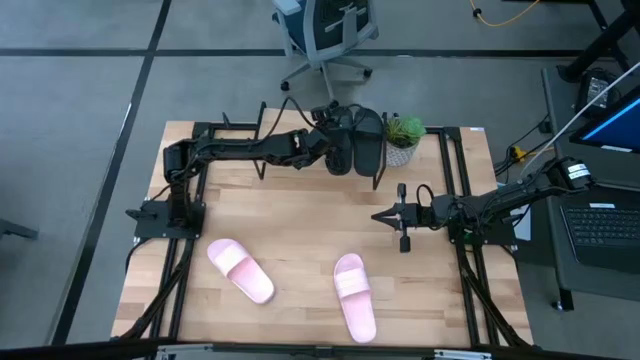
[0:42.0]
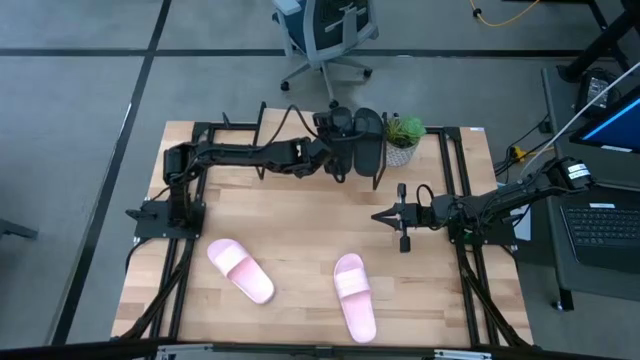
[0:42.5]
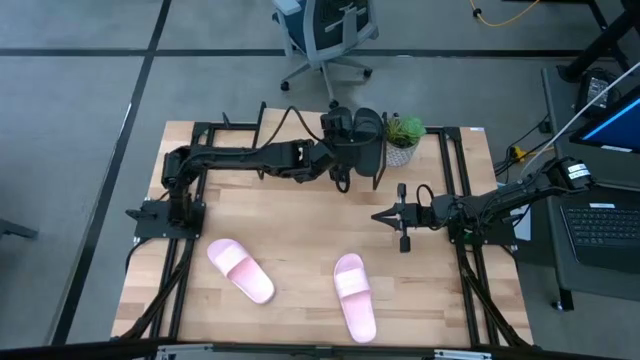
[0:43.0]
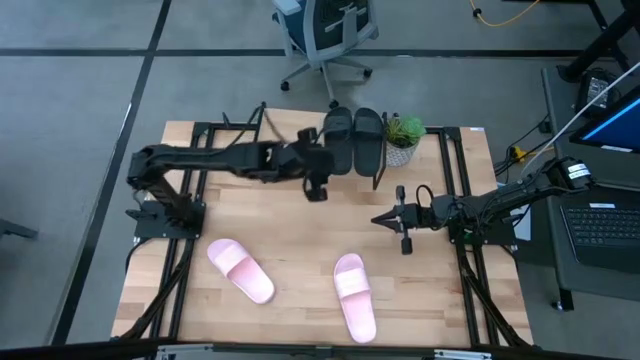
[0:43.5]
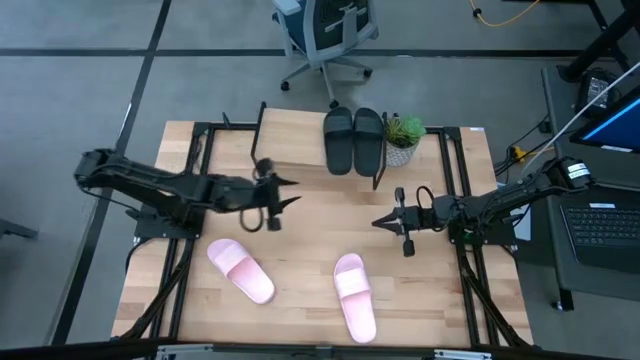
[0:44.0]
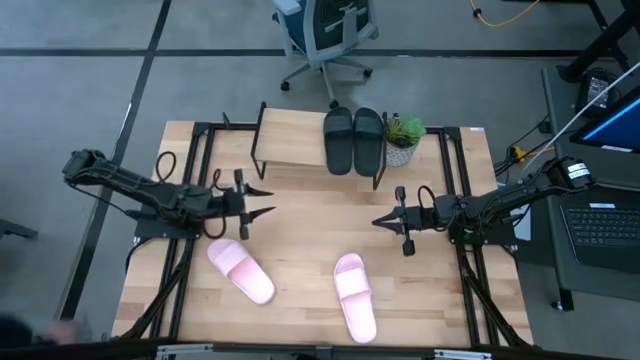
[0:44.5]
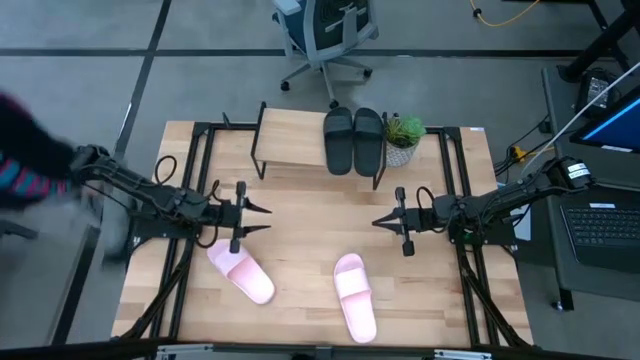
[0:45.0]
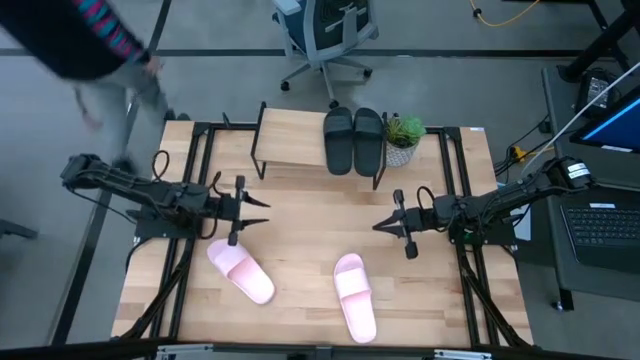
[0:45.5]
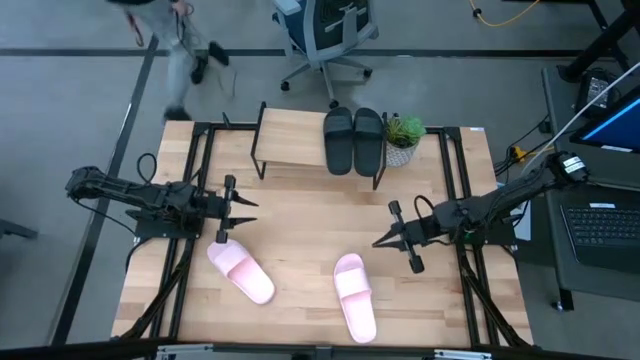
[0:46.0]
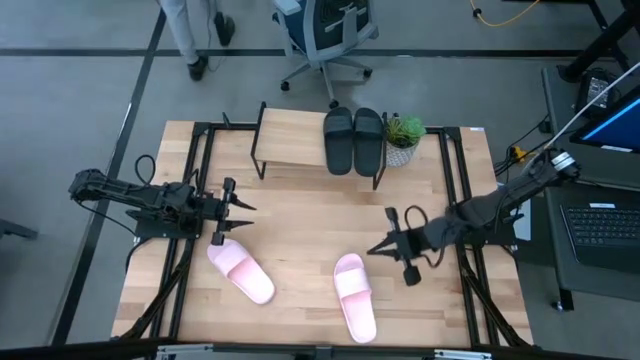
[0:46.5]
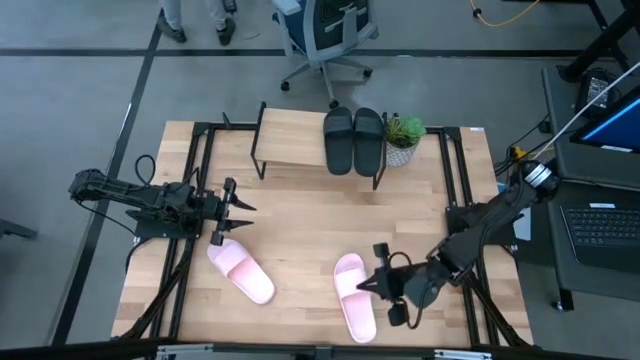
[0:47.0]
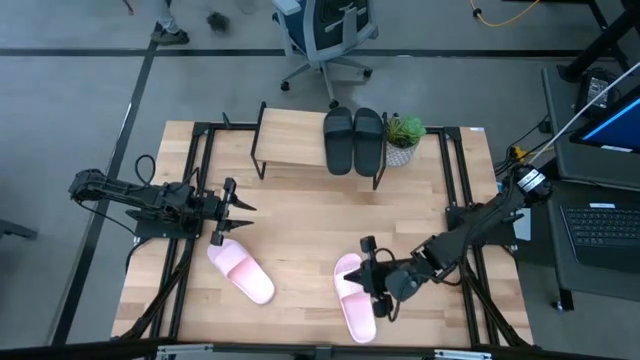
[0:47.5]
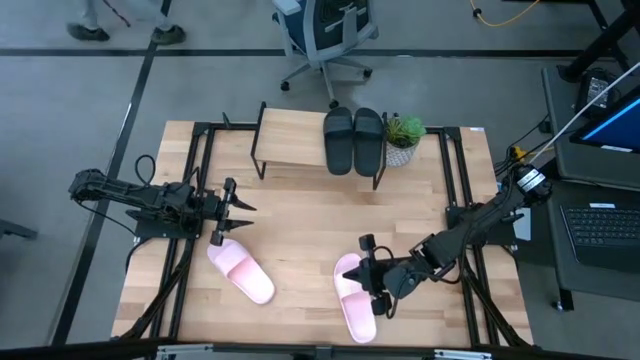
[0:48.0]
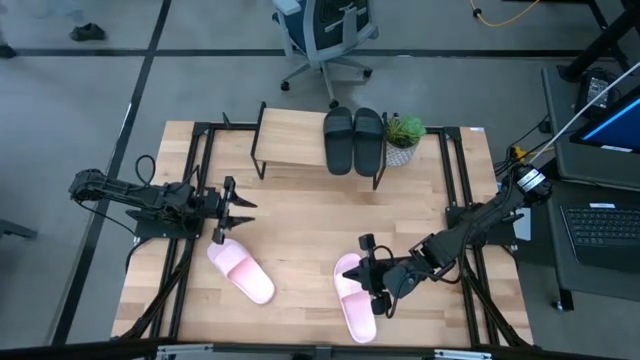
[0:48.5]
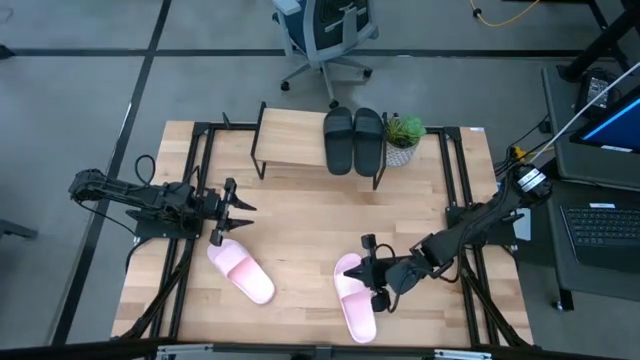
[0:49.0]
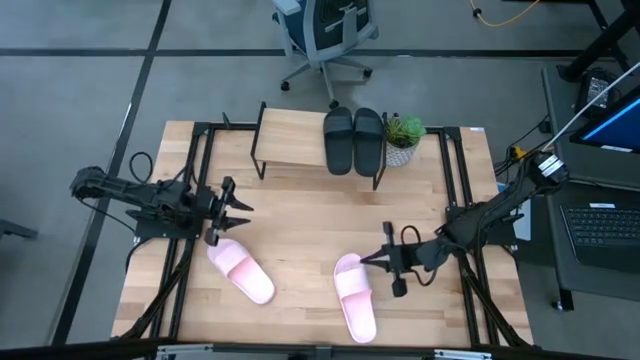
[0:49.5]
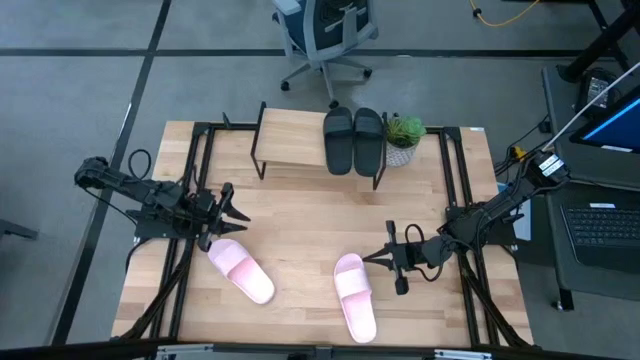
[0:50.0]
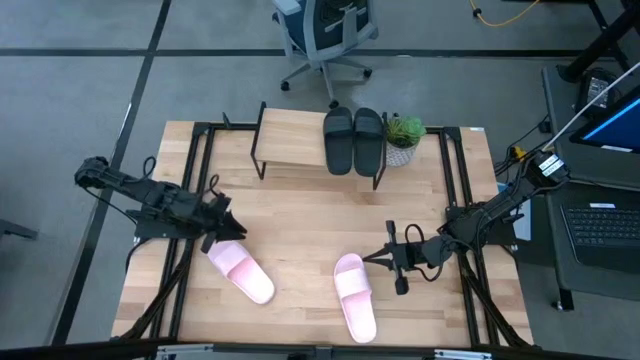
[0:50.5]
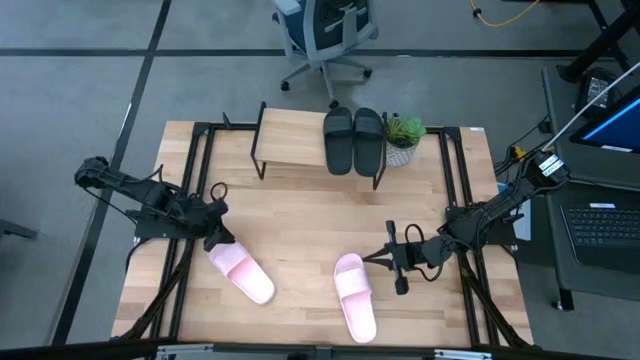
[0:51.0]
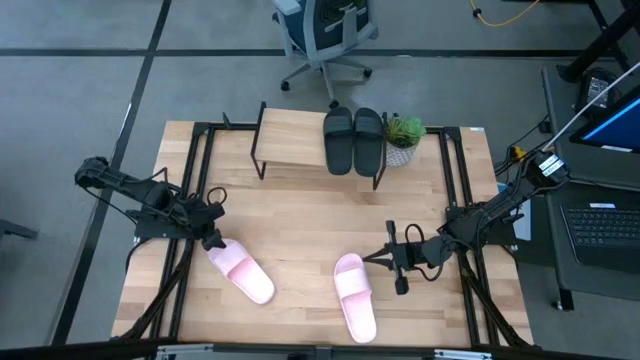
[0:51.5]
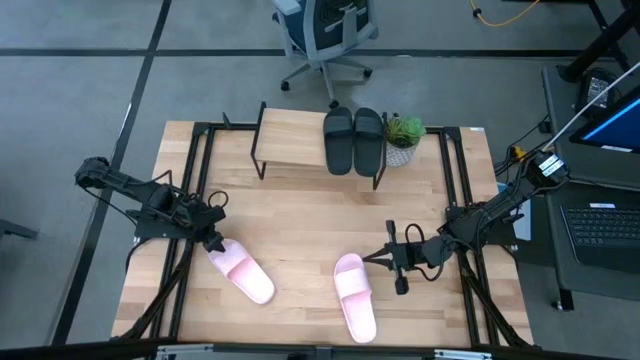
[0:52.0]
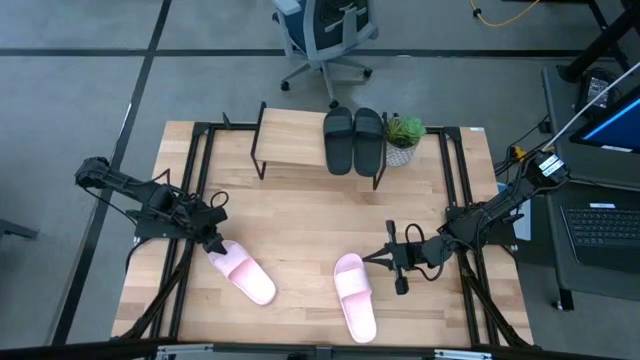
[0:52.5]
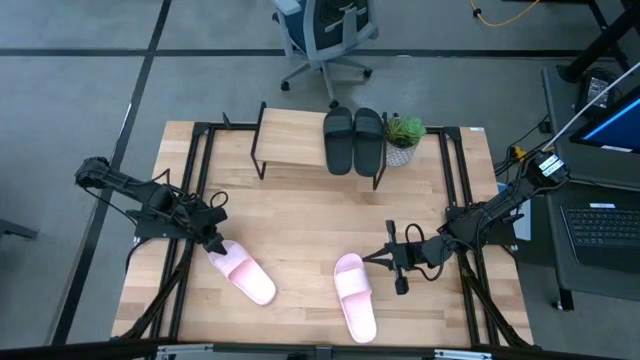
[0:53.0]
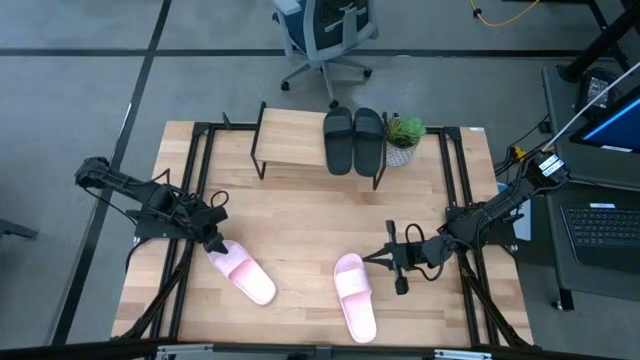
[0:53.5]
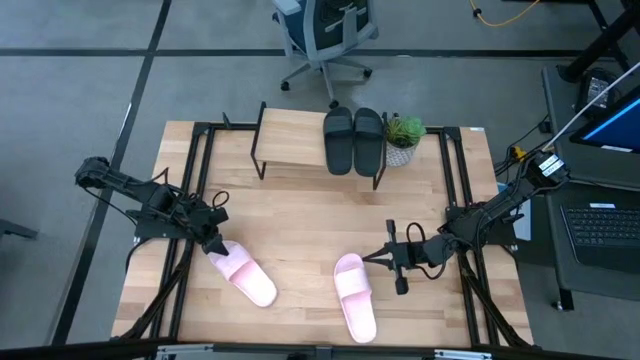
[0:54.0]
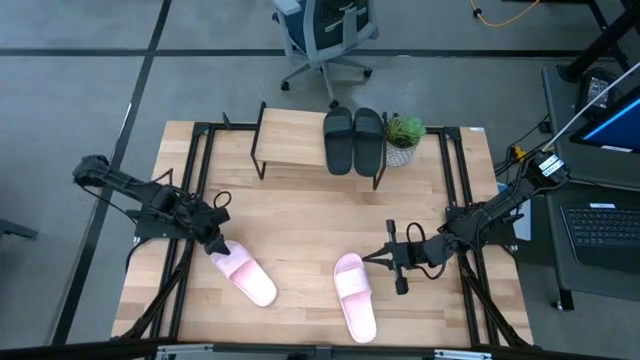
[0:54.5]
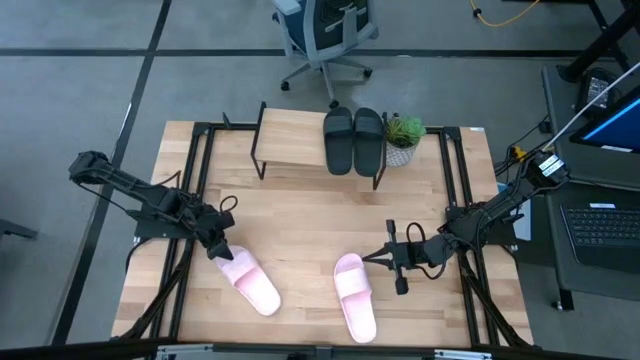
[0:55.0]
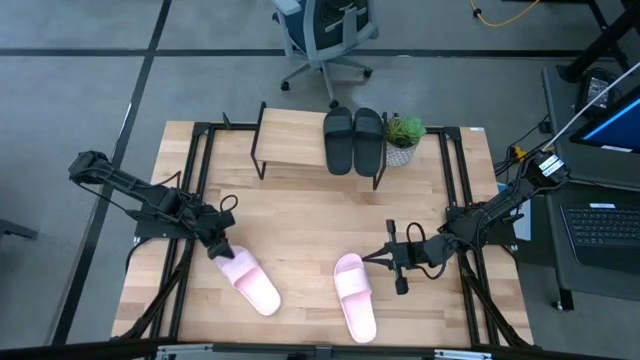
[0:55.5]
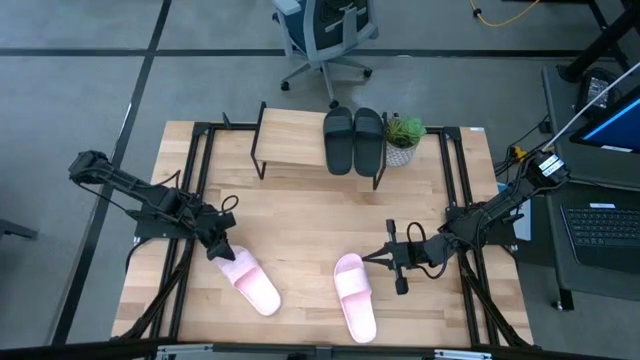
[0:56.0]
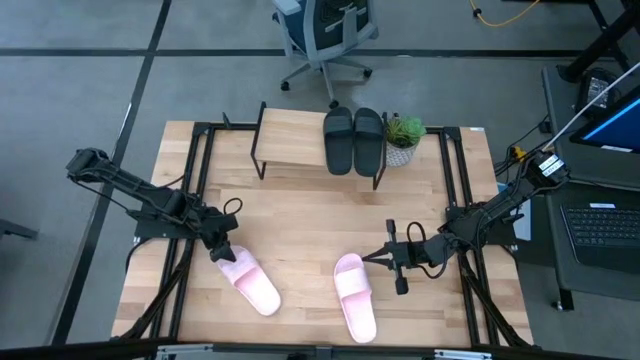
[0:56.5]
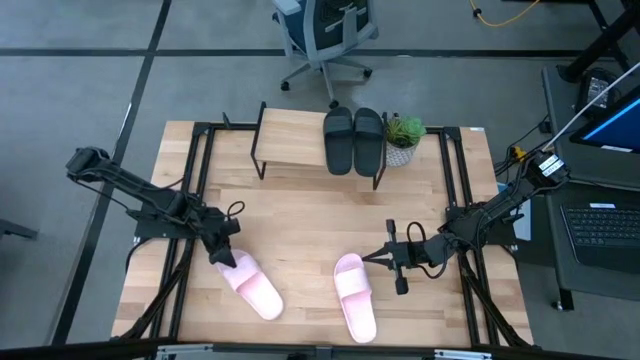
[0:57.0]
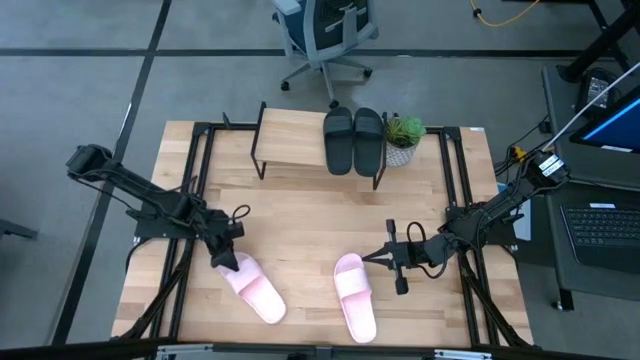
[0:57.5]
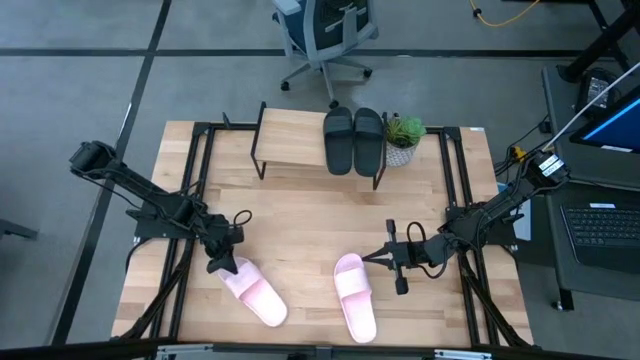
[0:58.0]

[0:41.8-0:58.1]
Task: Pick and place slides into the shelf
Put the left pink slides on the shelf

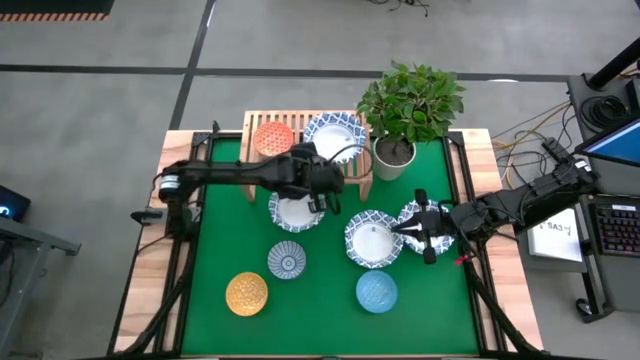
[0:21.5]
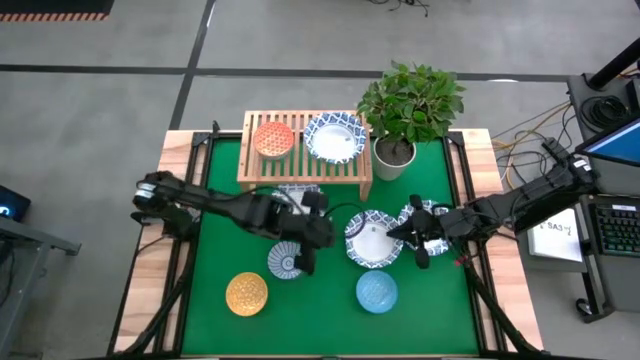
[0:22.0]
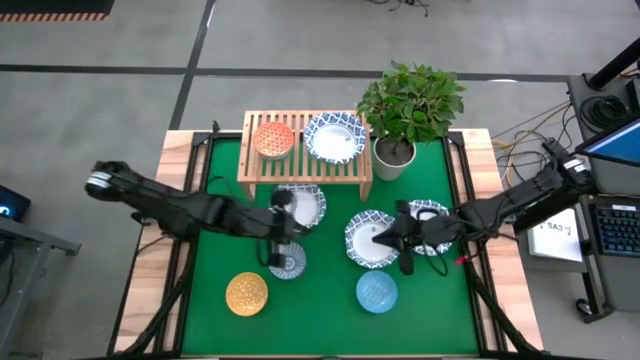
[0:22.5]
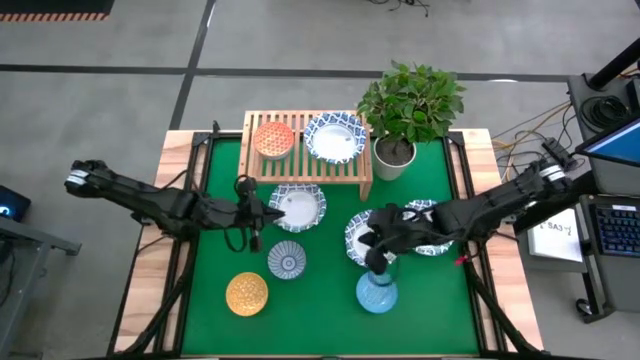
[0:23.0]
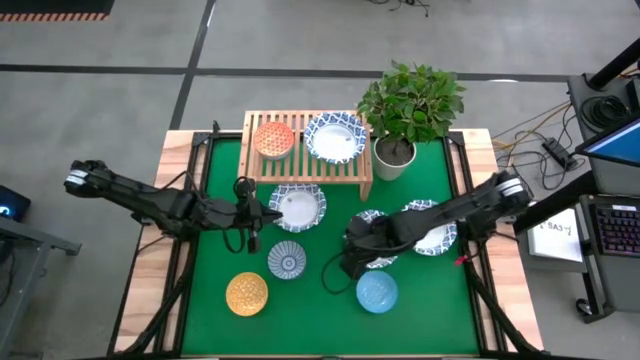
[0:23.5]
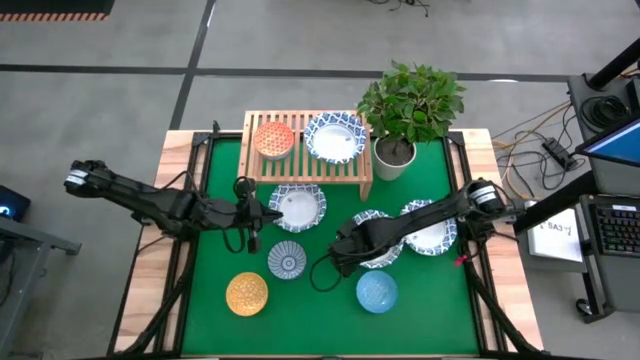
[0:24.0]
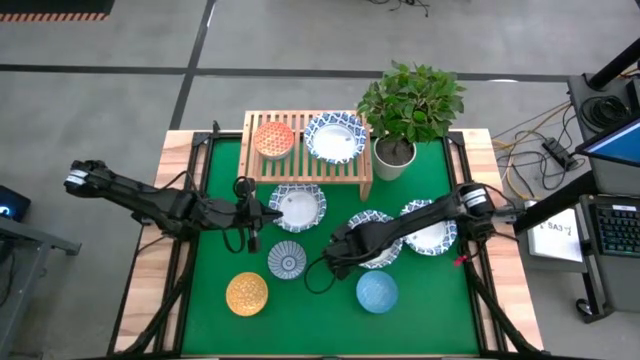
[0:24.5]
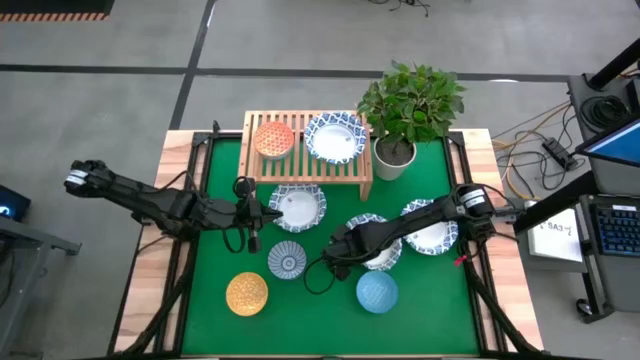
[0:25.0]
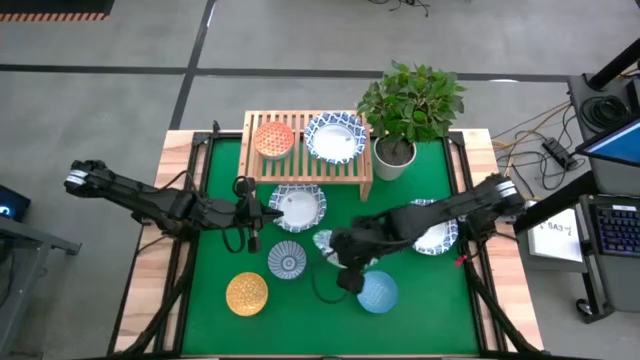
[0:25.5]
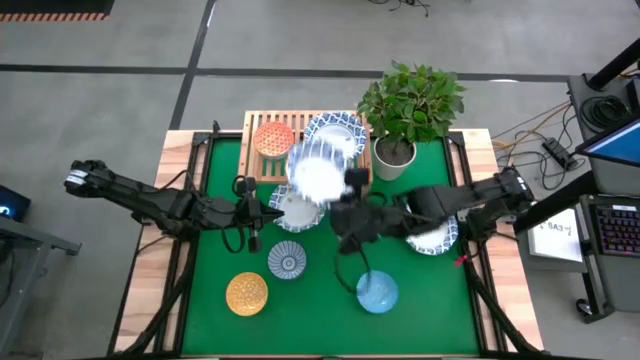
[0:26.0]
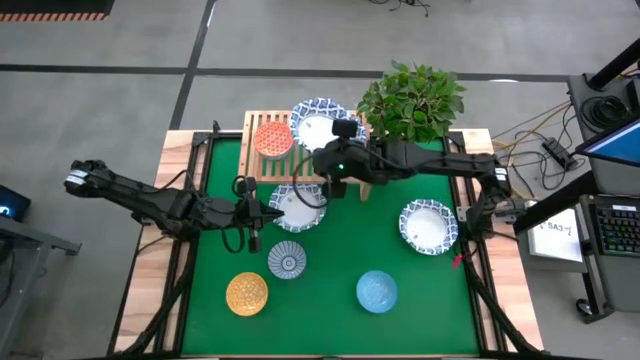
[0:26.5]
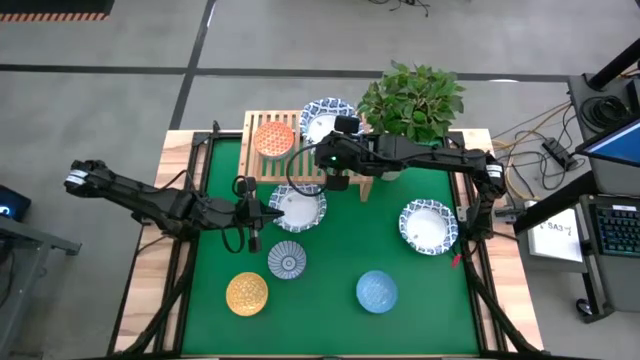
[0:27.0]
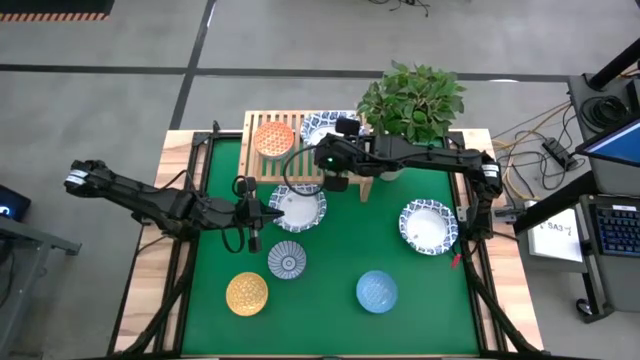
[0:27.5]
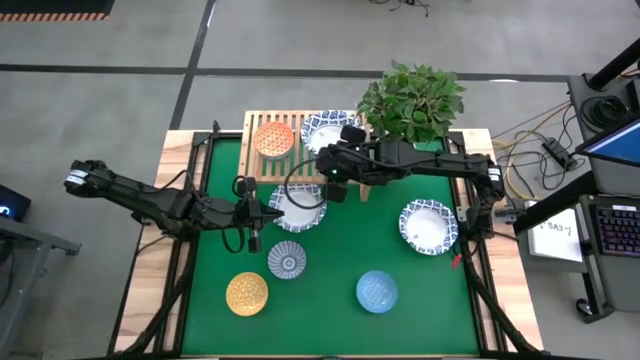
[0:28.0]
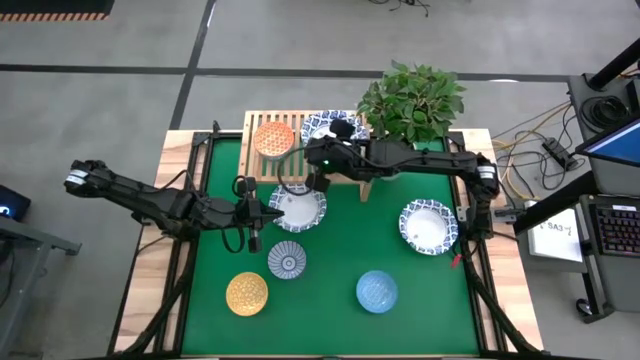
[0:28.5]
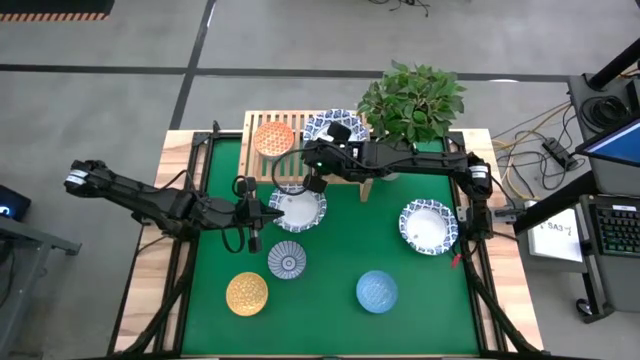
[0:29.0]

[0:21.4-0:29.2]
Task: Place and stack plates onto a shelf
Stack the middle white and blue plate on top of the white and blue plate on the shelf
